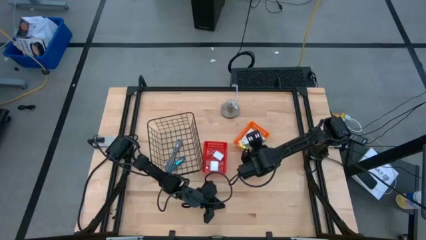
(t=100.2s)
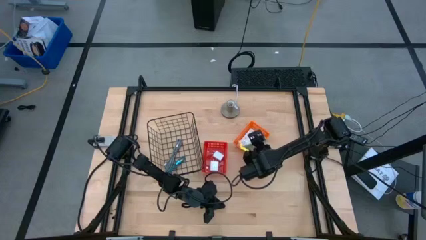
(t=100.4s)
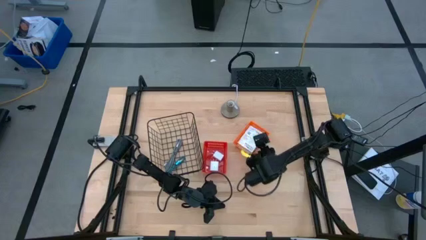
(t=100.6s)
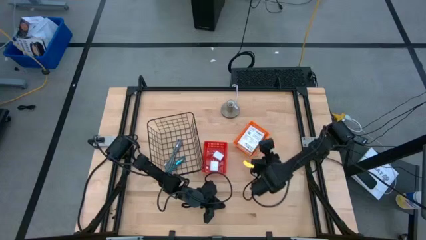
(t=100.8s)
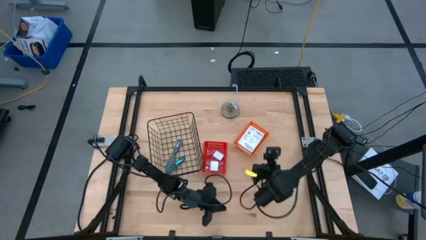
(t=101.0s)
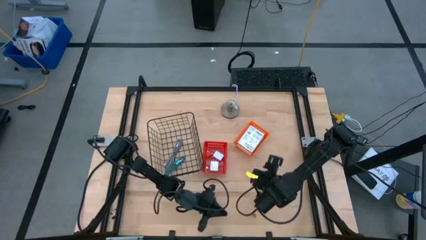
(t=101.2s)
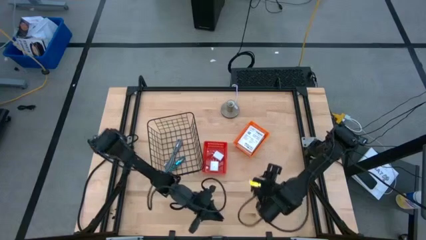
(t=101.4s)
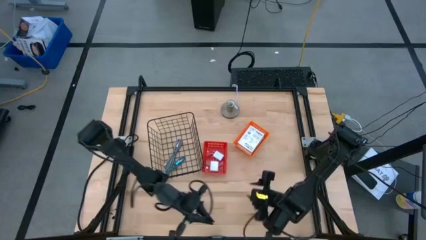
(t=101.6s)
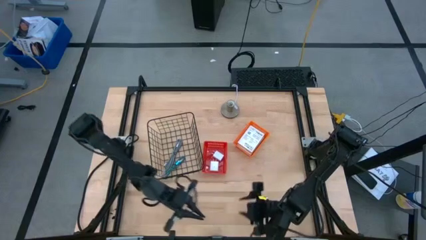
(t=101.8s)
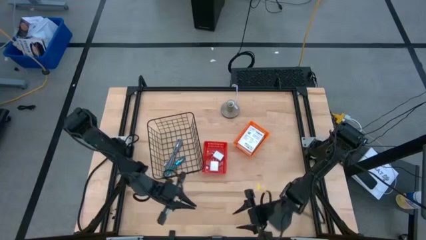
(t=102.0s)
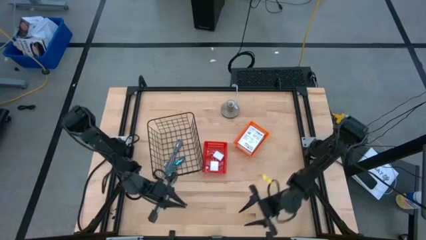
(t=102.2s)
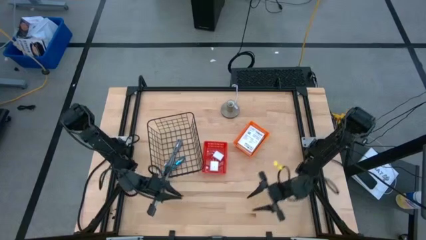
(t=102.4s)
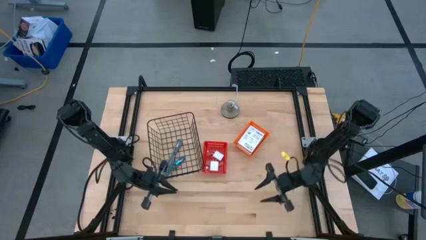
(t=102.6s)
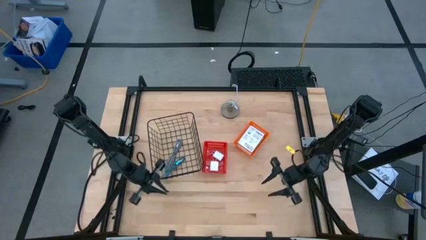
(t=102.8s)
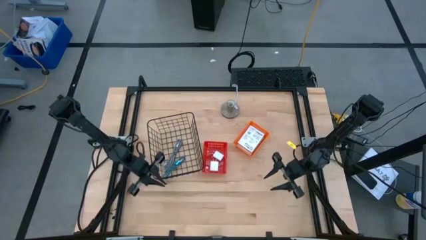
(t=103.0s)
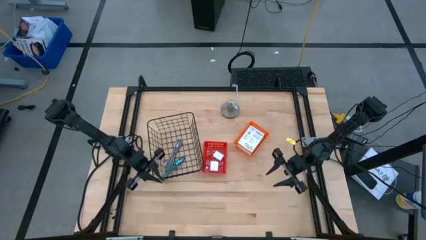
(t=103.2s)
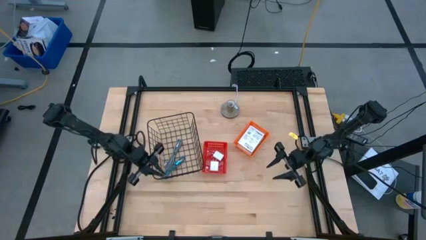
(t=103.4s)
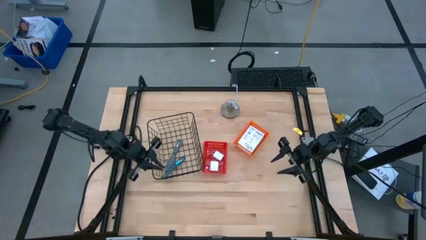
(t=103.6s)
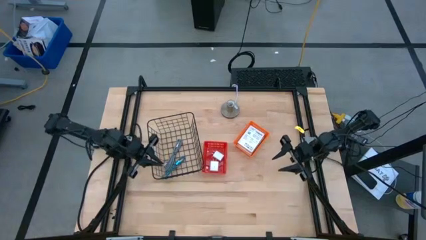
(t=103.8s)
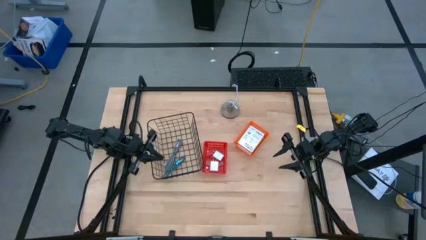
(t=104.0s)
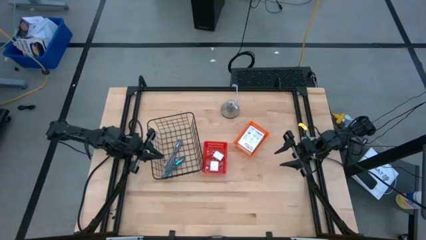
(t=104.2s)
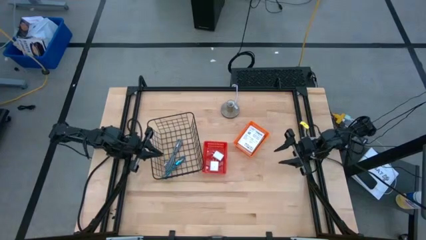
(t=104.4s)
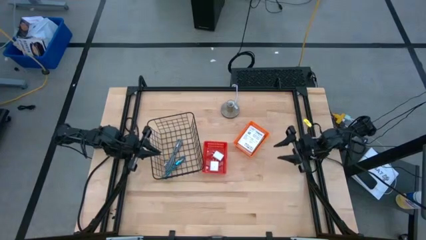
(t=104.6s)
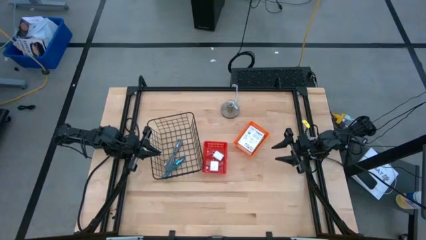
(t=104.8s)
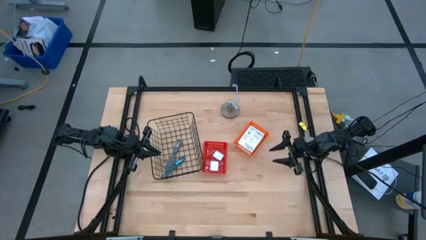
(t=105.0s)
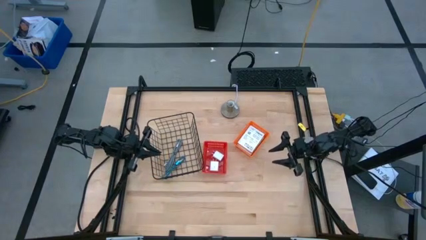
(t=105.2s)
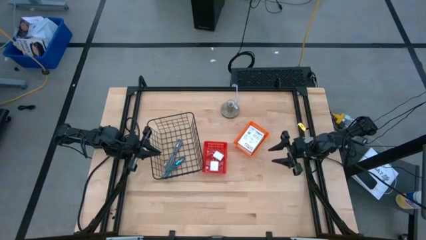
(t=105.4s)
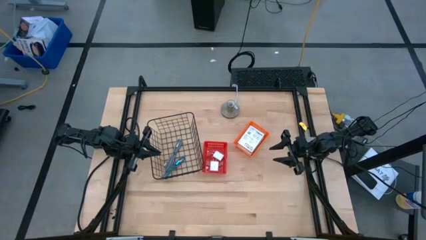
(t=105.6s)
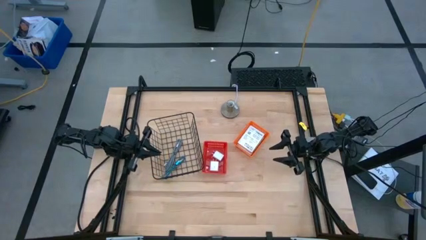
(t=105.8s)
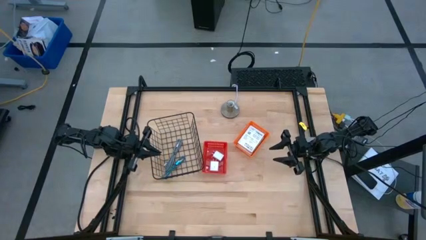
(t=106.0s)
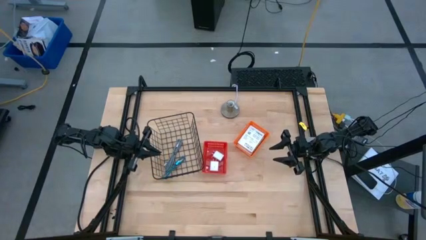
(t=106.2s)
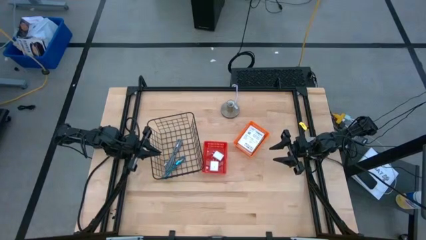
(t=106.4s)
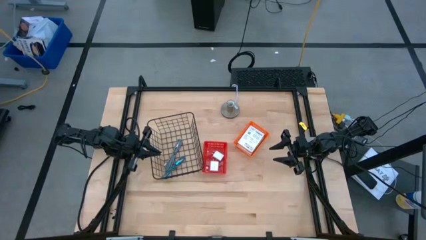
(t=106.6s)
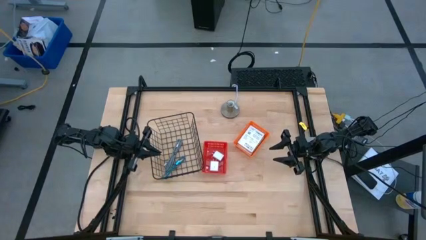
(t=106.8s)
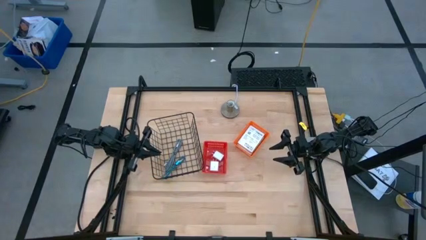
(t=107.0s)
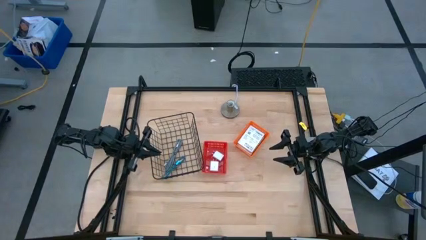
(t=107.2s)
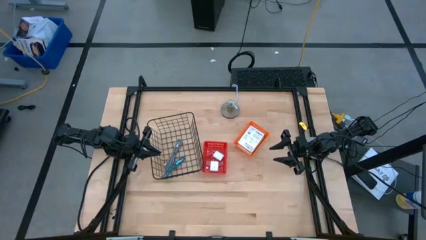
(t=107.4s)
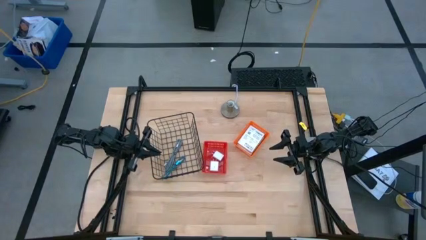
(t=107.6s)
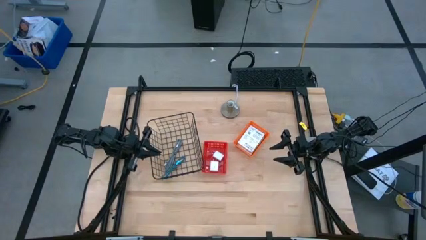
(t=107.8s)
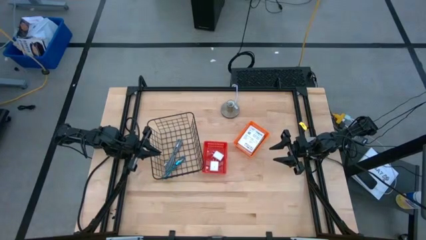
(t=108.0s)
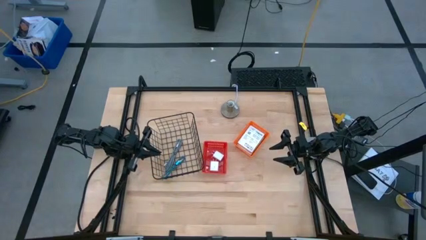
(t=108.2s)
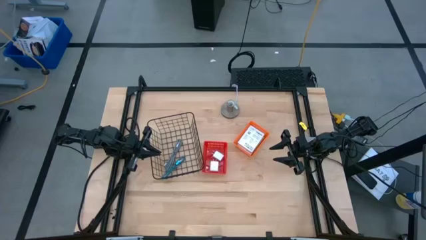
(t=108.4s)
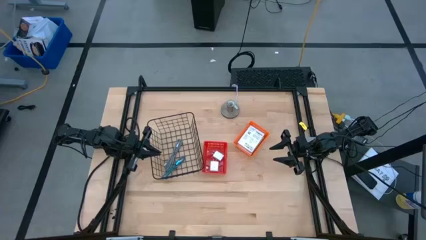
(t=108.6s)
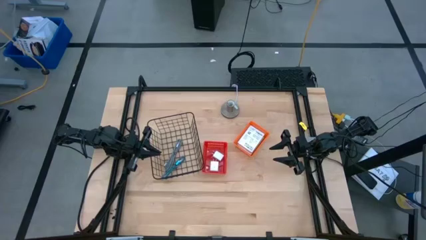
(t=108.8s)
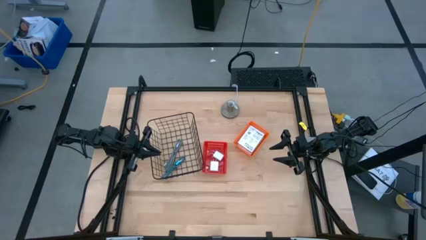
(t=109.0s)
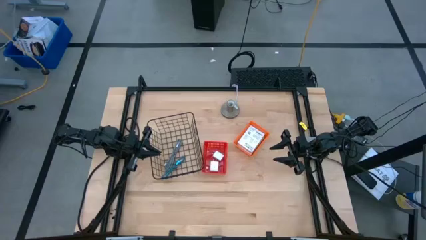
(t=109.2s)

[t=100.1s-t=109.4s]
Task: Pick and place items into bin
Return to Home Position
